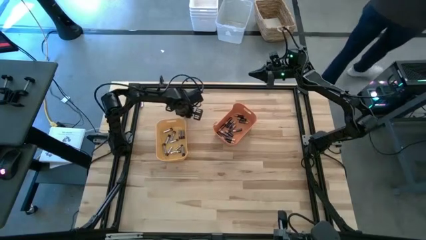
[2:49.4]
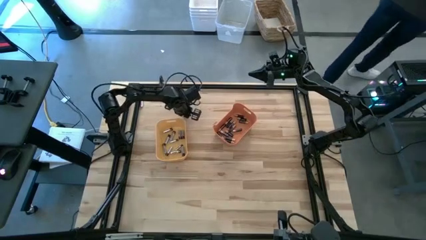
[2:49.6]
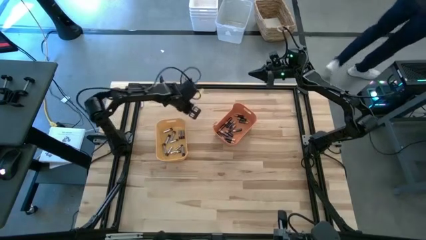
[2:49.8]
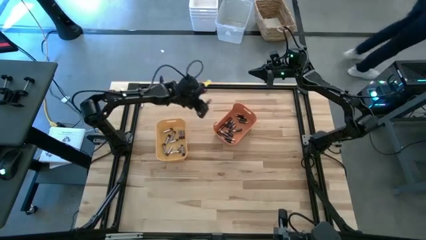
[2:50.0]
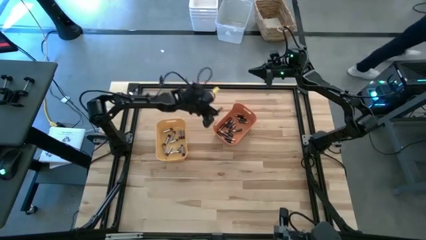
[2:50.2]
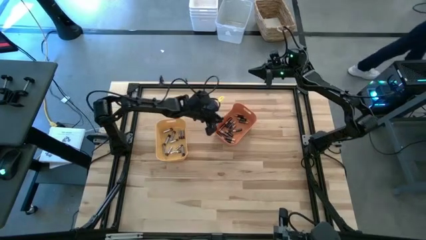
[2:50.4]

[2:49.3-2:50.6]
Task: Sort batteries
Put the black battery into the orange bin

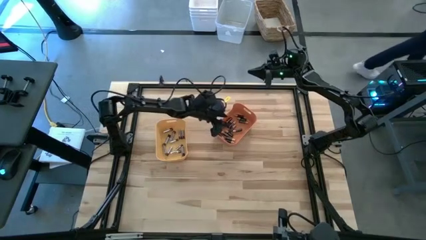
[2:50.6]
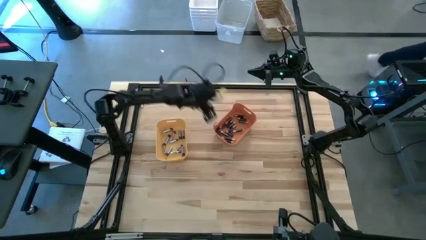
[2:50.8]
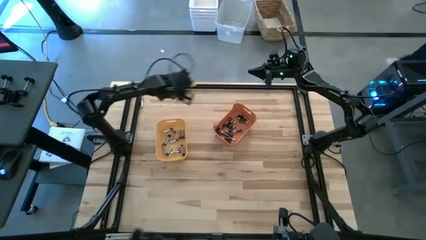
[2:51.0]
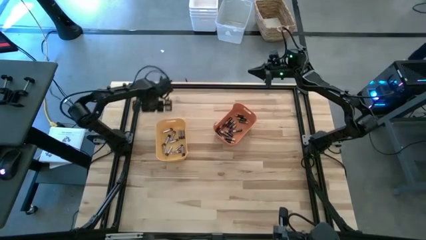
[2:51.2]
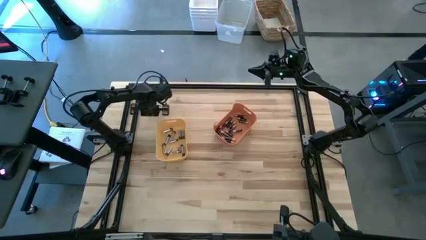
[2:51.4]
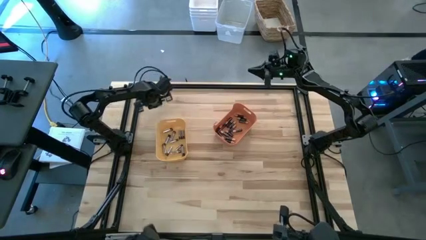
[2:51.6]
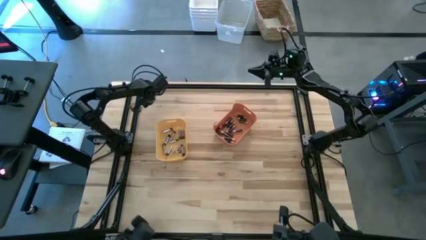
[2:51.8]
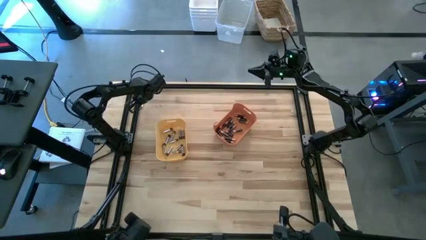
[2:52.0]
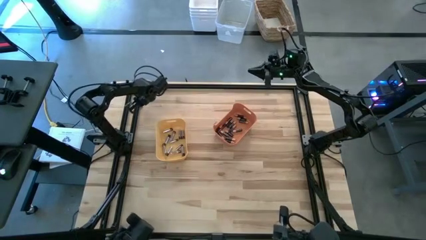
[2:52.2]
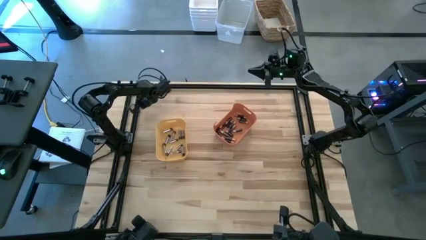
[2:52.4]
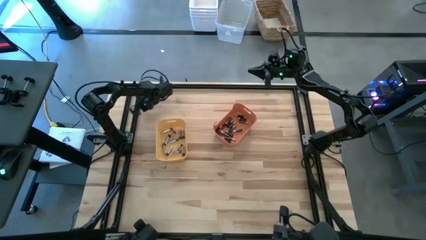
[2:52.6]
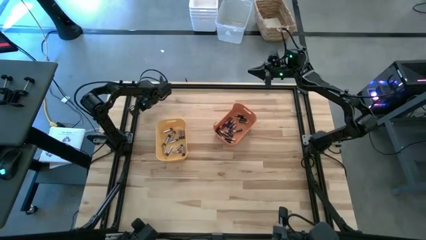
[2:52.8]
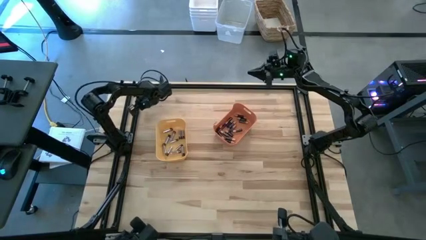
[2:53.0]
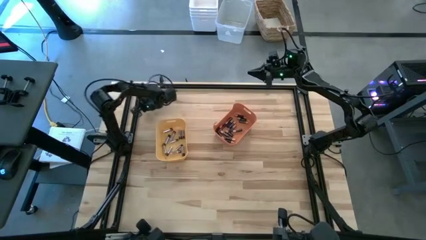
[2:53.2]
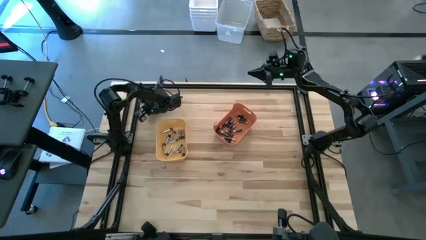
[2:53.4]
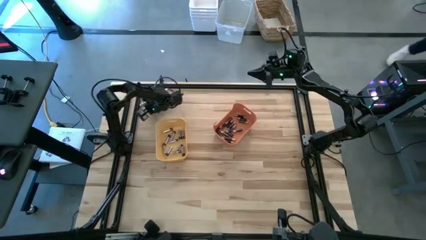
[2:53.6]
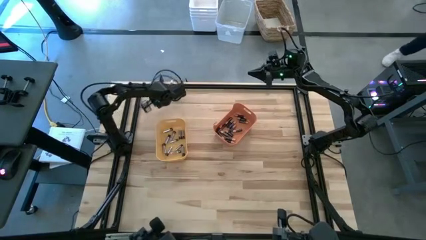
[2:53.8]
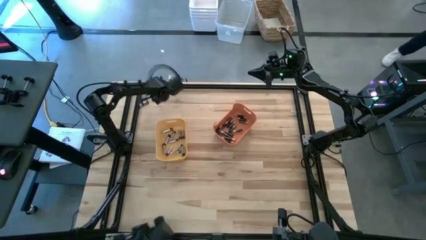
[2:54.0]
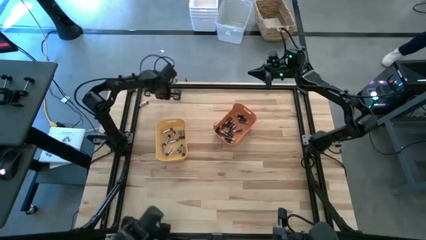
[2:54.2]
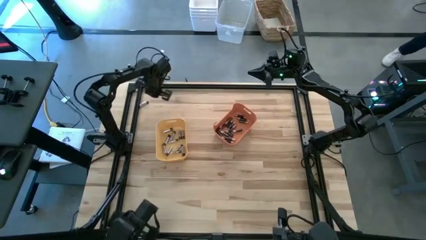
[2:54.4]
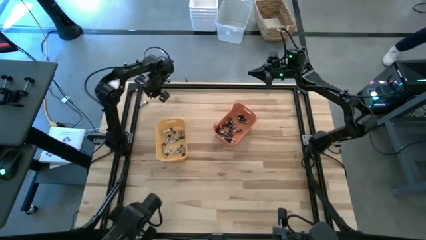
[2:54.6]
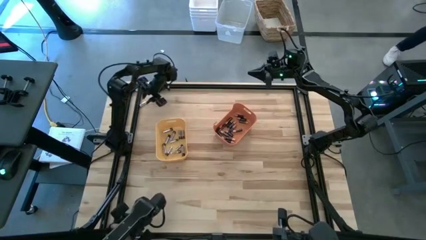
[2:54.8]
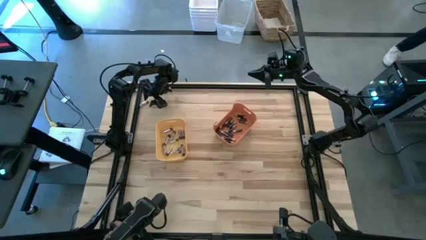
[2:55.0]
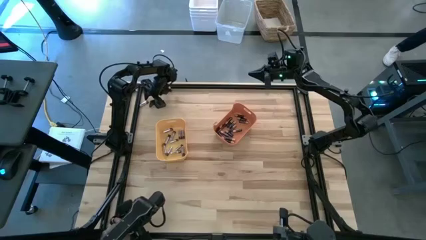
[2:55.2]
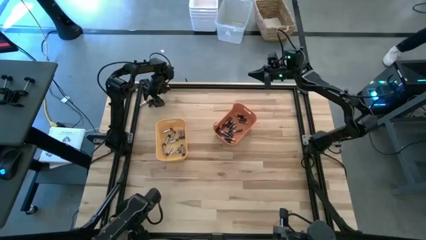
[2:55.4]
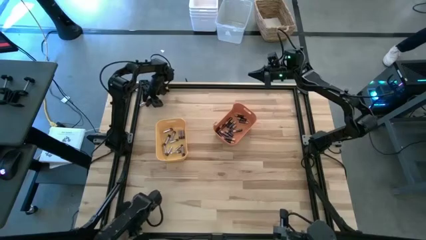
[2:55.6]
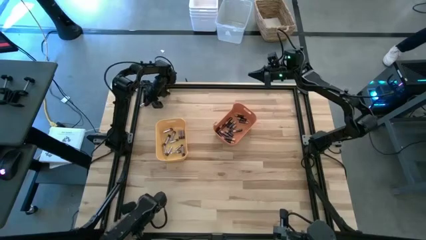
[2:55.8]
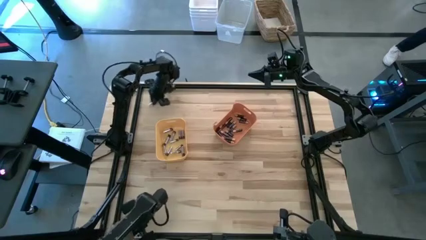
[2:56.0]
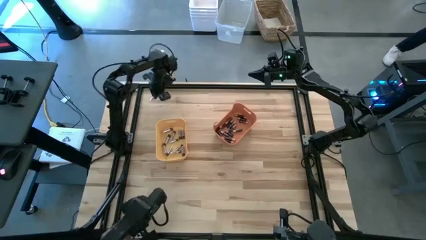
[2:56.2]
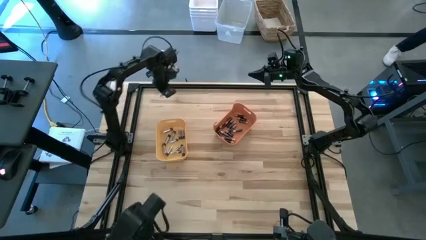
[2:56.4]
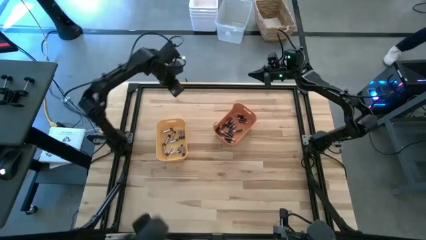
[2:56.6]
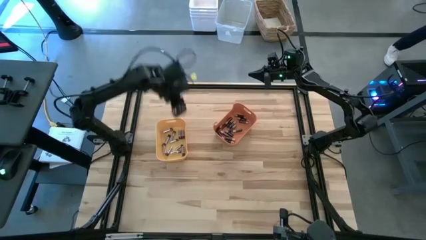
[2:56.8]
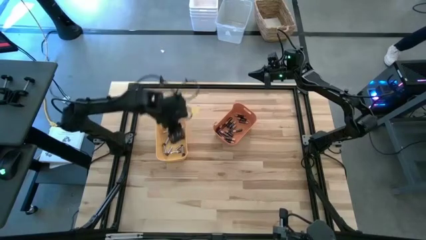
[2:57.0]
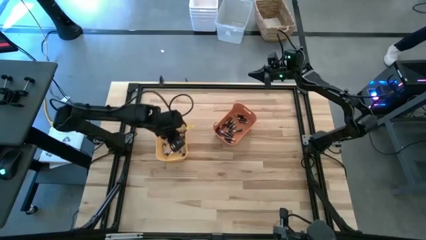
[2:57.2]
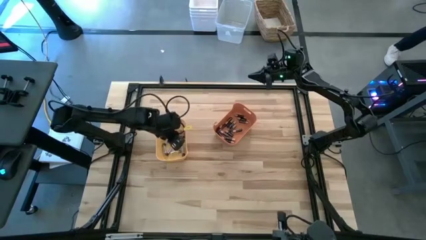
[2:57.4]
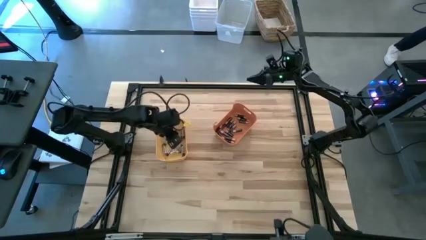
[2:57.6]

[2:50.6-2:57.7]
Put the silver battery into the yellow bin

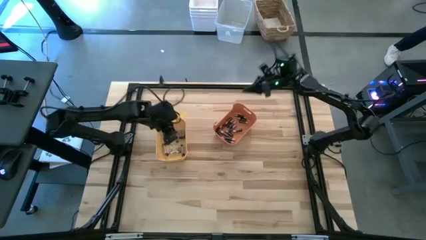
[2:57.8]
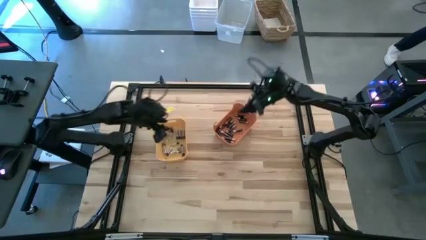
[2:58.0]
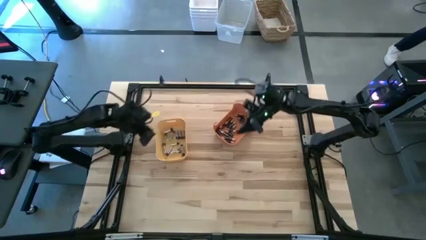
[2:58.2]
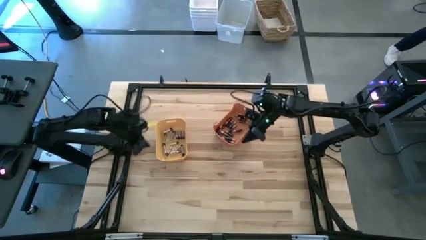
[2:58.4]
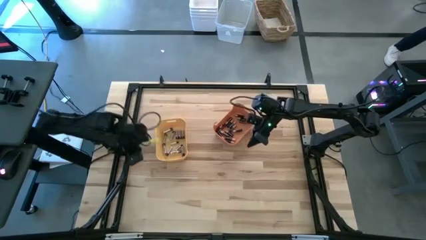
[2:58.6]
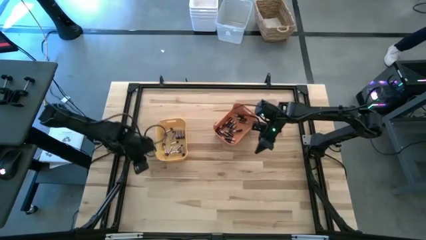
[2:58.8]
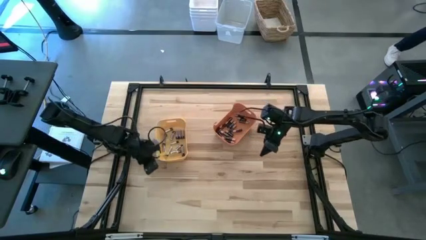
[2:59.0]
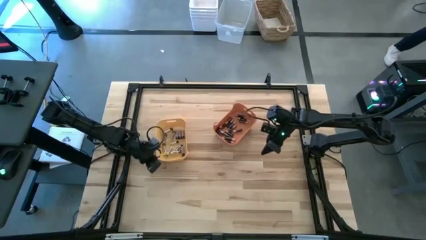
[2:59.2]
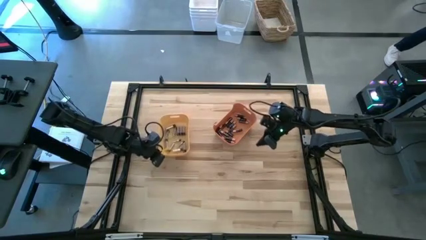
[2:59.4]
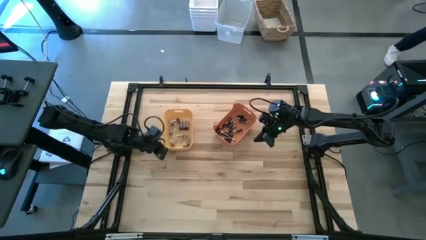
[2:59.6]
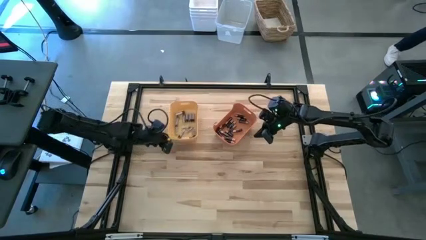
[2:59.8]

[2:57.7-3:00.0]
Adjust the yellow bin

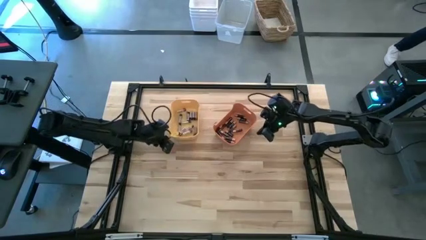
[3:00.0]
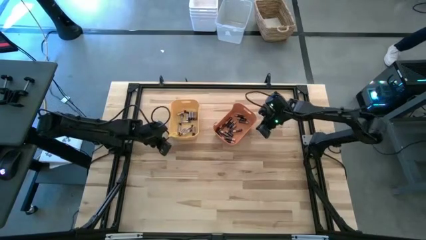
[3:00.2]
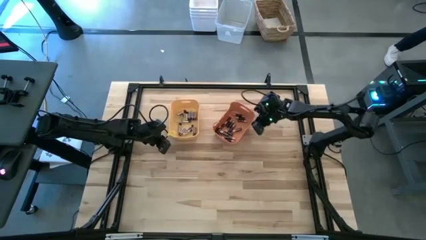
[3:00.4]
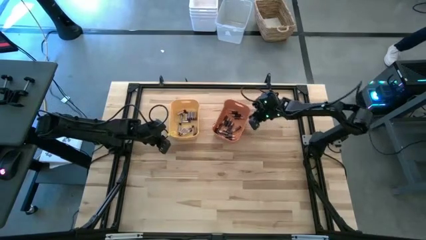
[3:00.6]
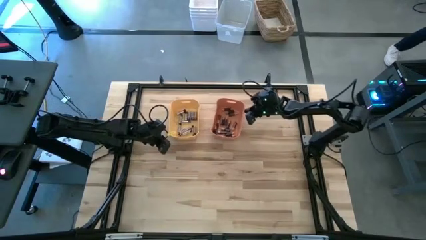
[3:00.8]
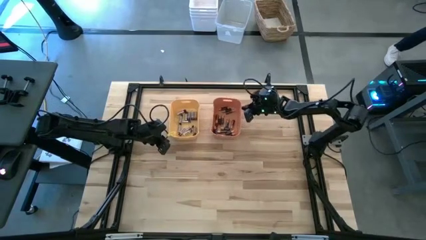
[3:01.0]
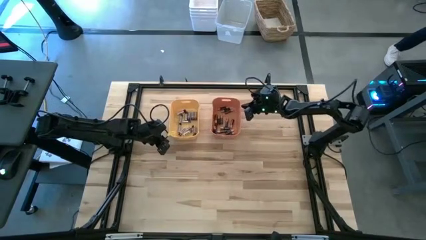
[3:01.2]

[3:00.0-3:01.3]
Adjust the orange bin

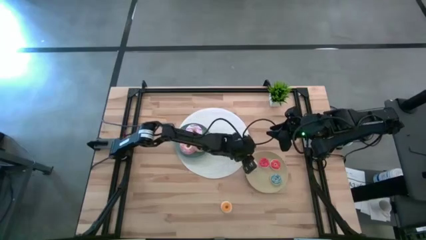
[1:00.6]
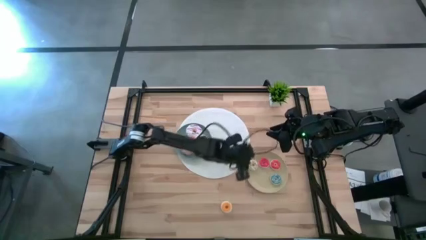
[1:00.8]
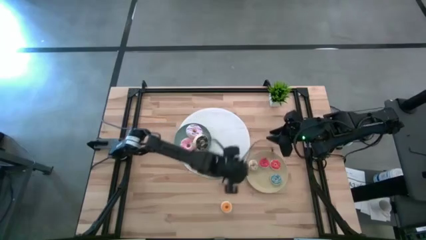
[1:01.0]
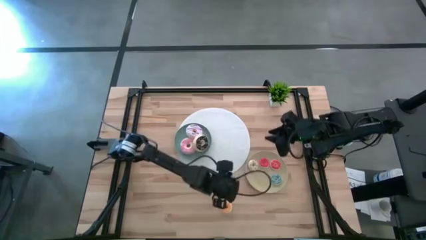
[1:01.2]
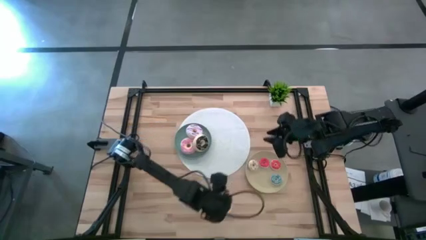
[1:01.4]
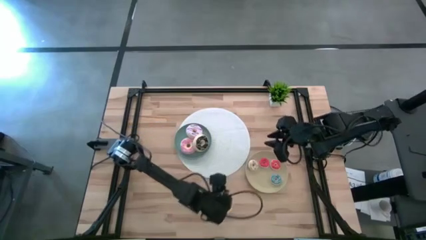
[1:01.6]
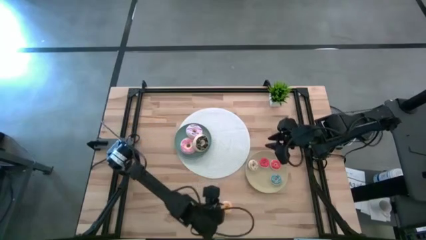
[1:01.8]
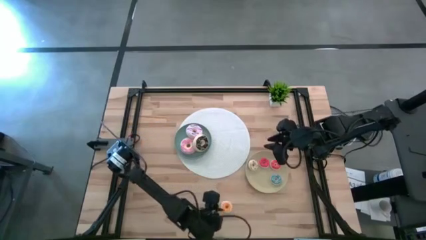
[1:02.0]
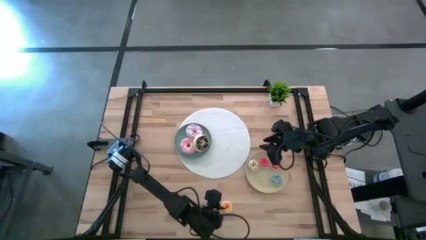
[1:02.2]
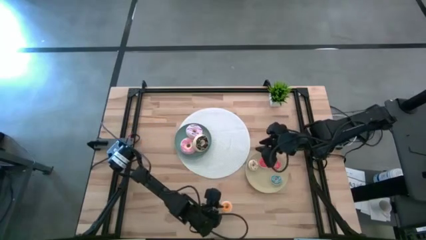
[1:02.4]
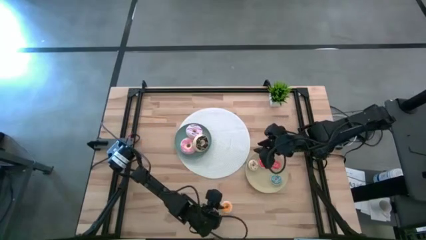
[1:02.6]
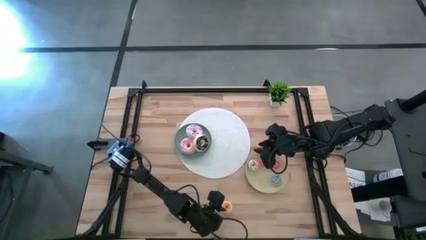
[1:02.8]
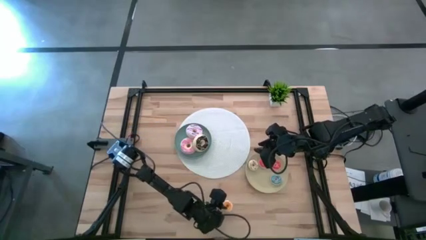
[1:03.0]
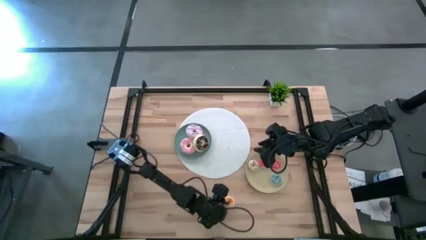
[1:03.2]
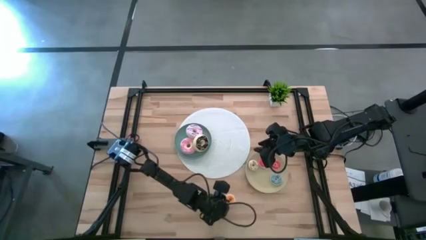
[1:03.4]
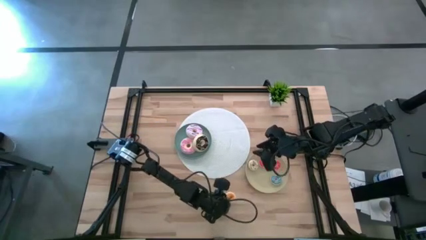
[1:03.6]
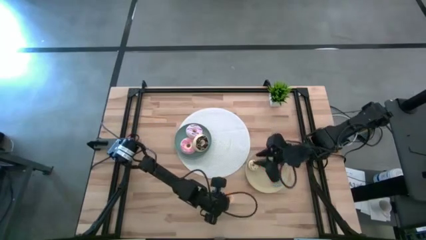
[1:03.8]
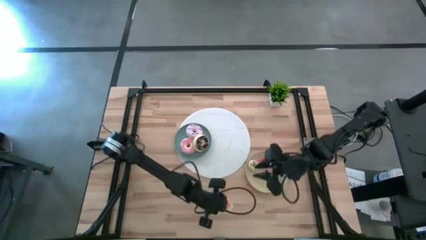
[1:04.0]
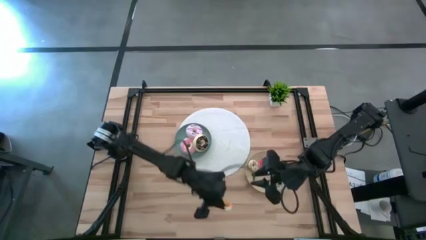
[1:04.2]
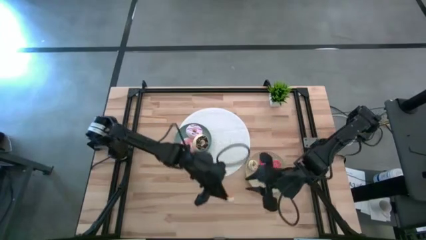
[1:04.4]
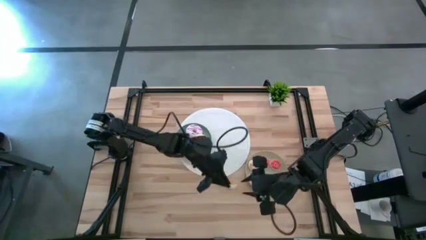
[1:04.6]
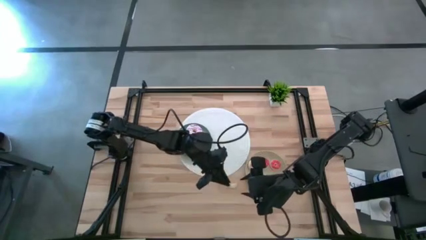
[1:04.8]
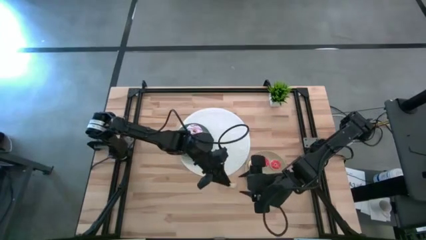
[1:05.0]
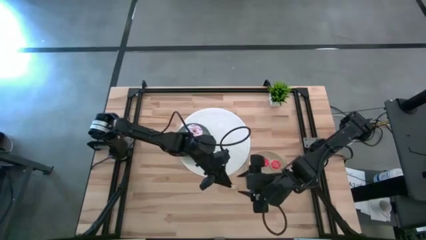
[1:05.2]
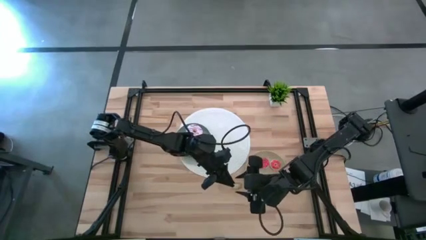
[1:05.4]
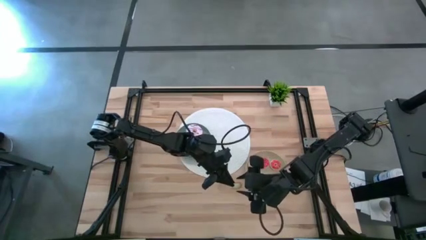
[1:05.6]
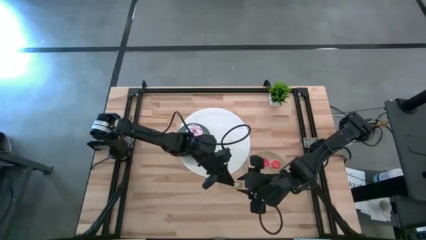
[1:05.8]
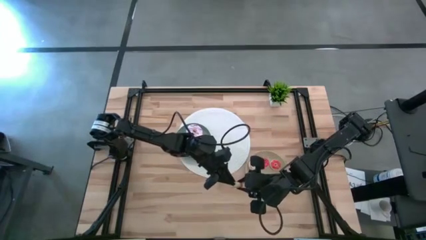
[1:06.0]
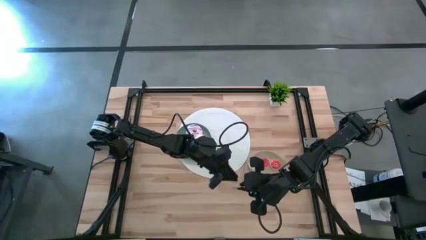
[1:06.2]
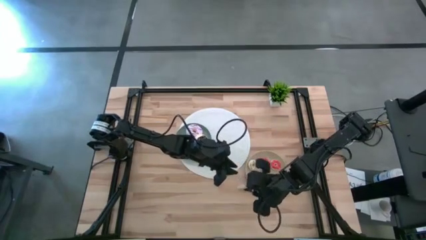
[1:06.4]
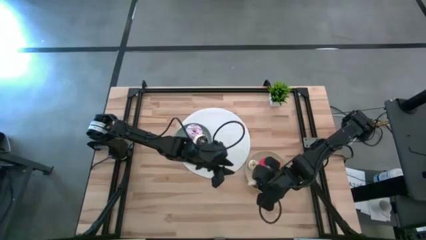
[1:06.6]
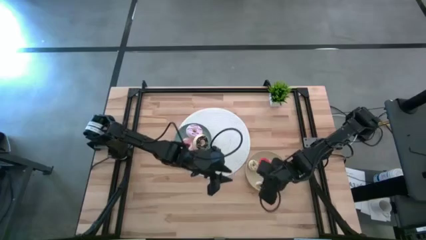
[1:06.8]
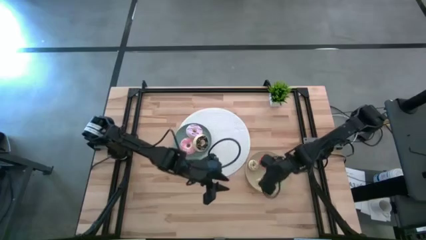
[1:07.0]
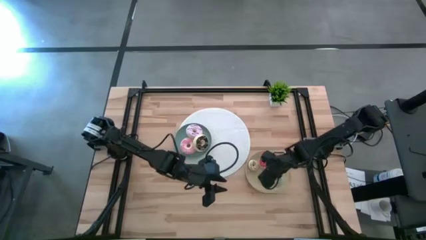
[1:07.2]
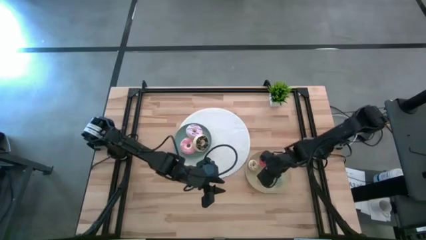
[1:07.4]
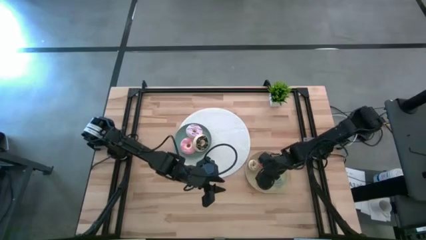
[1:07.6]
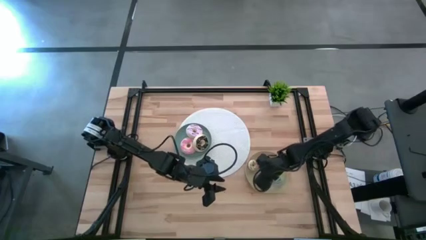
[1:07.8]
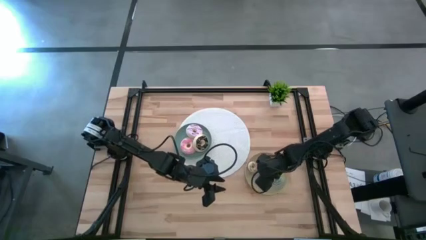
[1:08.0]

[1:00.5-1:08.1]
Task: Pick & Place donuts
Put the small yellow donut on the brown plate
